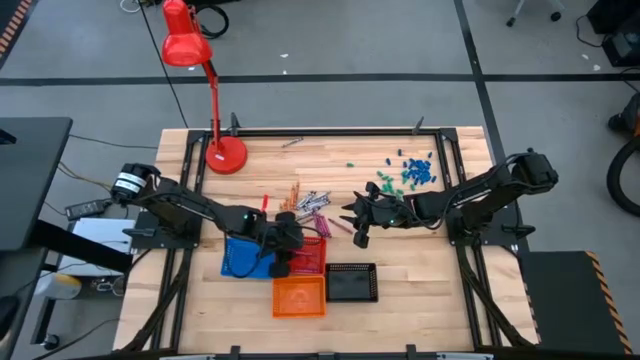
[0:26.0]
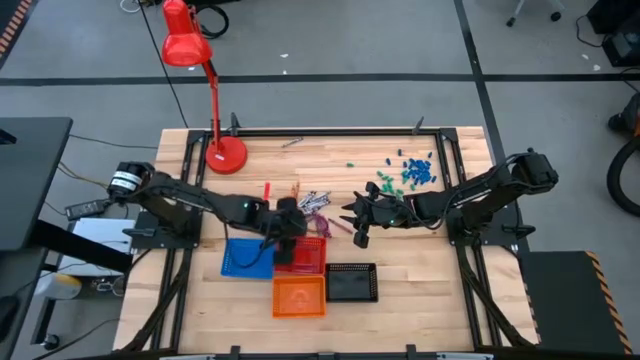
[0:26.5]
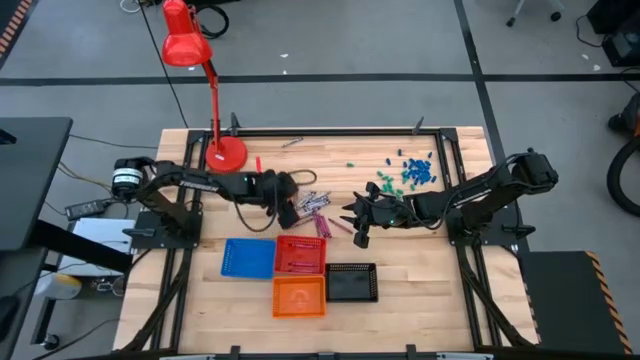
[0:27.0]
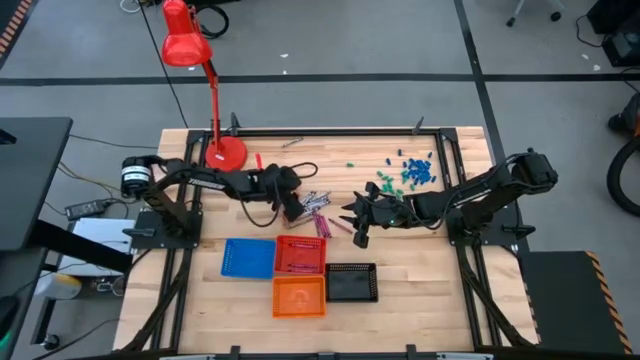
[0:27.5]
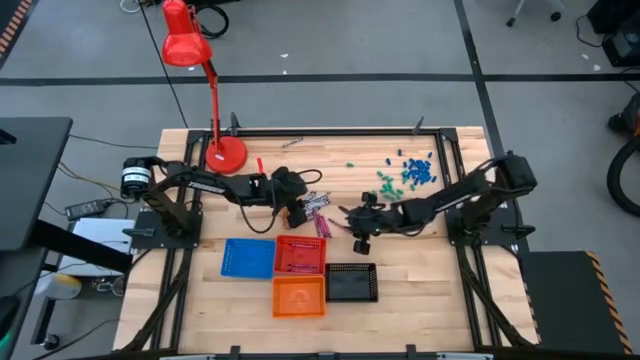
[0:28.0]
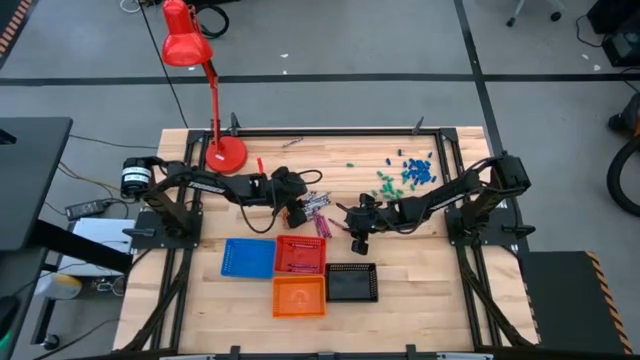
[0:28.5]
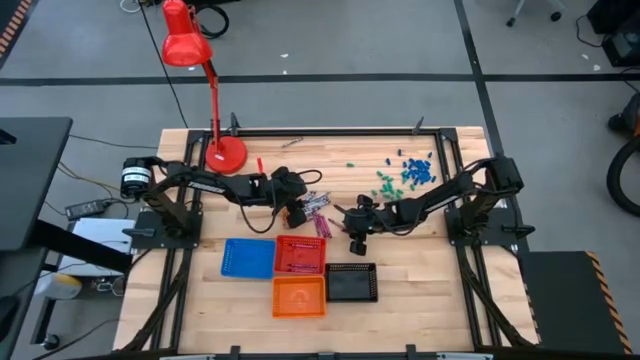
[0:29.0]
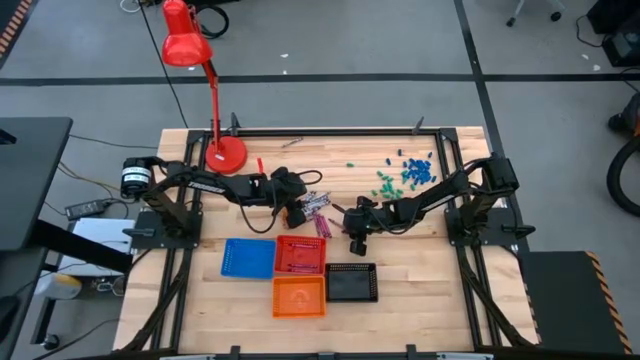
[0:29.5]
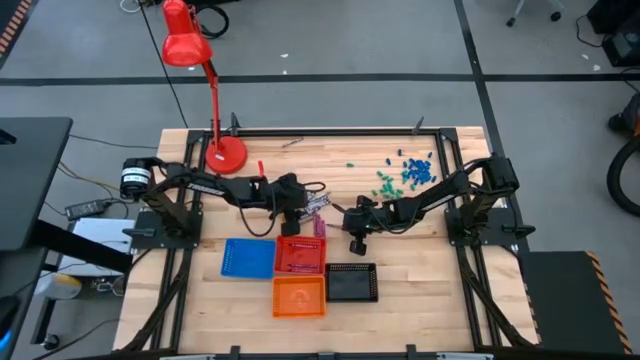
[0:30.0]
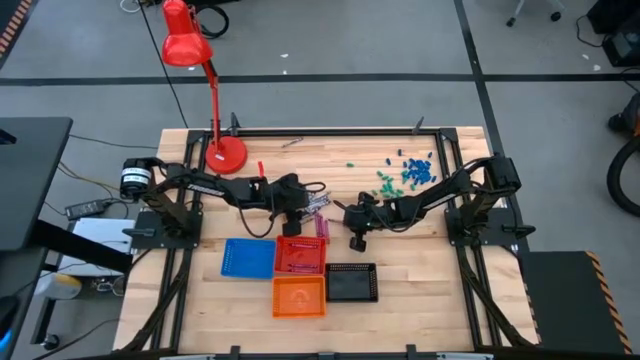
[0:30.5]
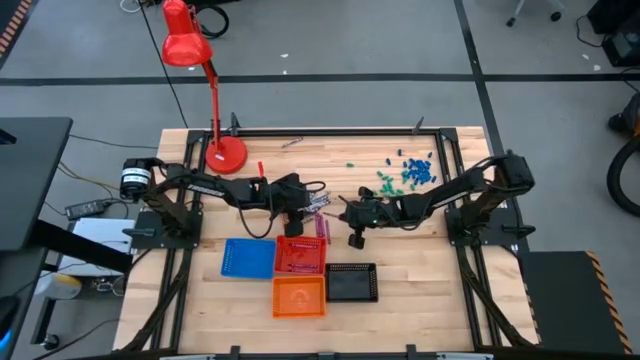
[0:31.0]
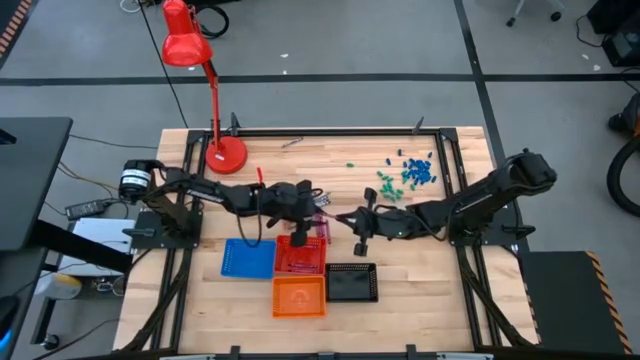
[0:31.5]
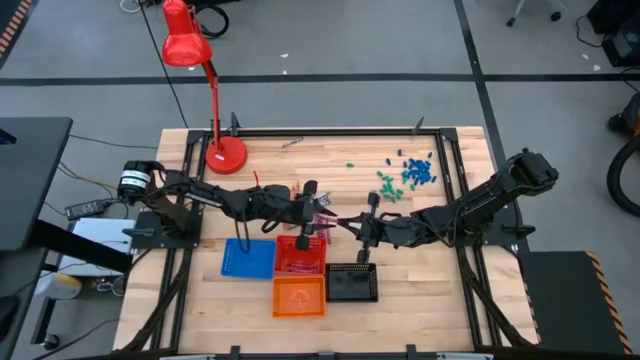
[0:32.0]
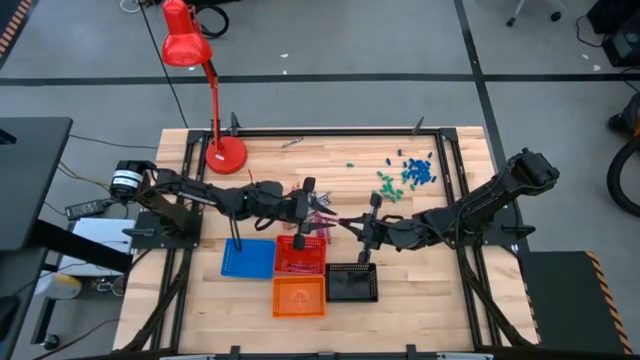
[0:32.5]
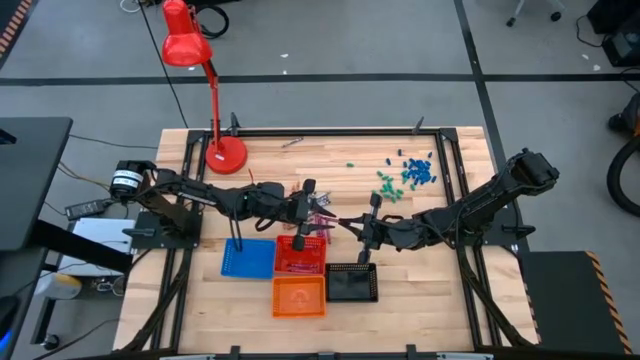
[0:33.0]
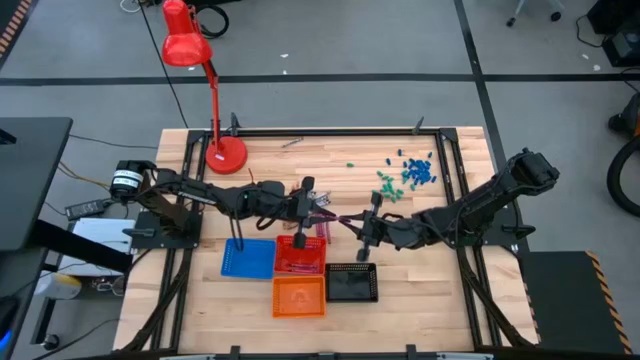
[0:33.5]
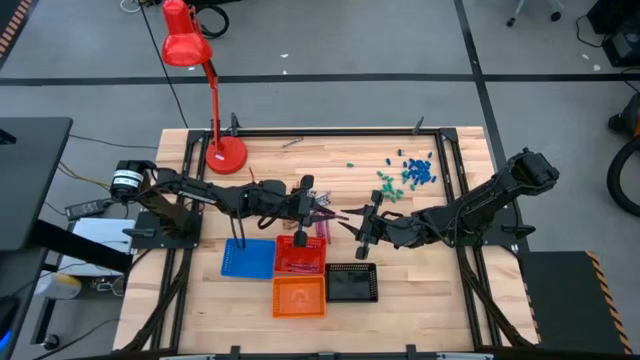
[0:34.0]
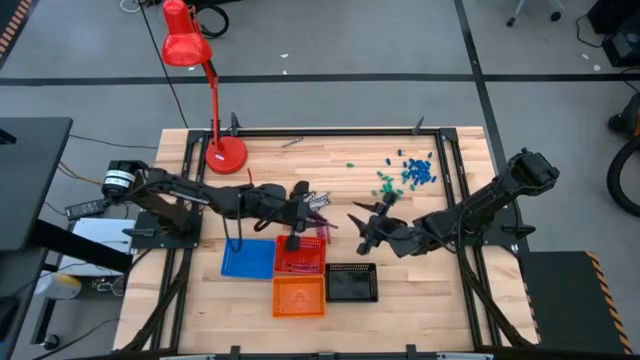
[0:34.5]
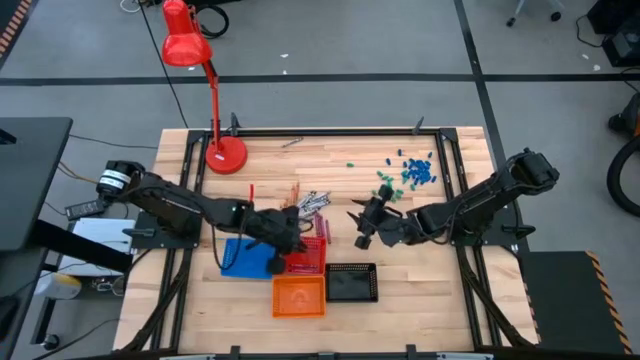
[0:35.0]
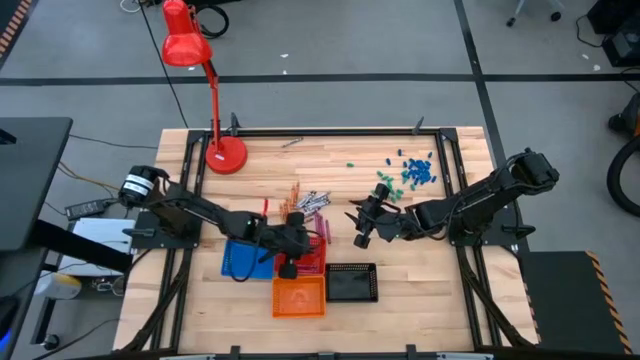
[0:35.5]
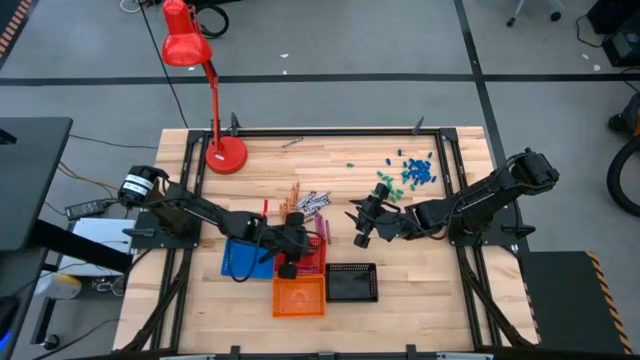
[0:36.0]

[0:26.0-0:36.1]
Task: Sort crayons
Put the violet crayon into the red bin

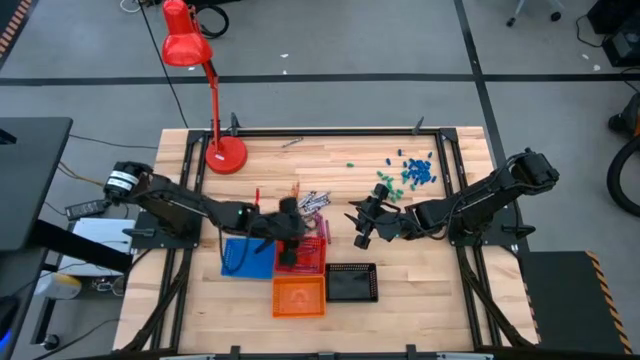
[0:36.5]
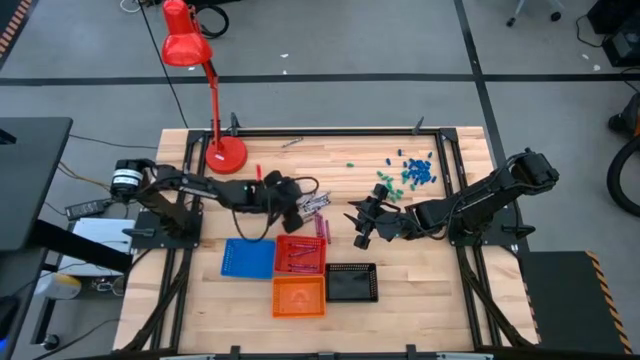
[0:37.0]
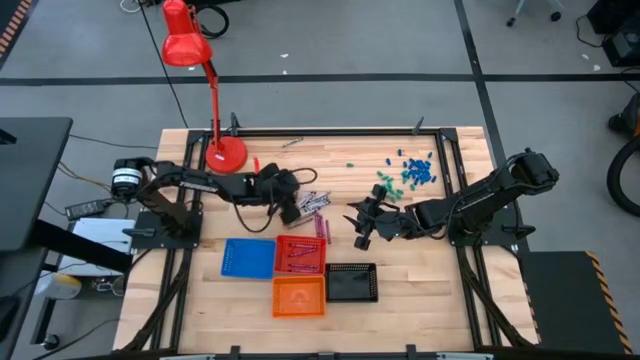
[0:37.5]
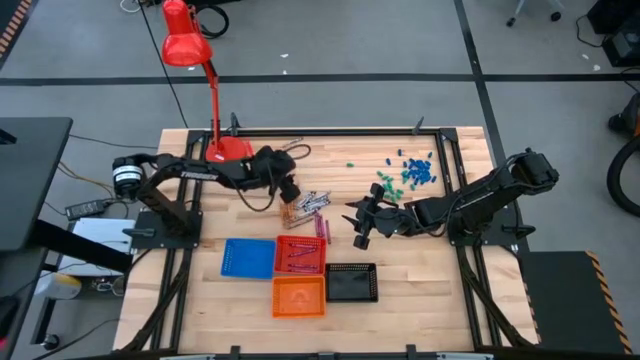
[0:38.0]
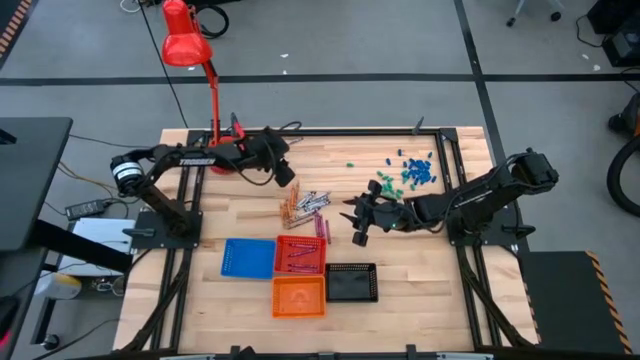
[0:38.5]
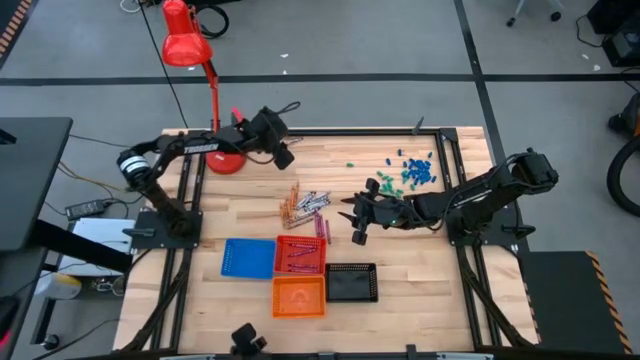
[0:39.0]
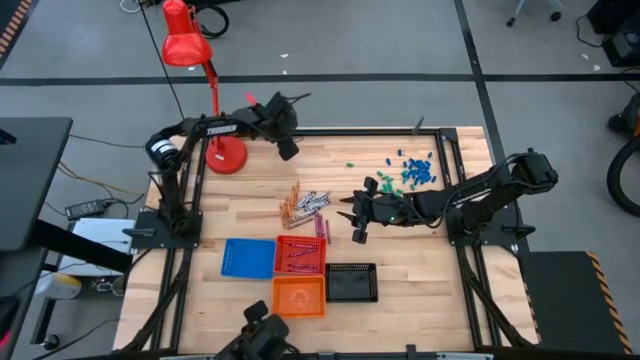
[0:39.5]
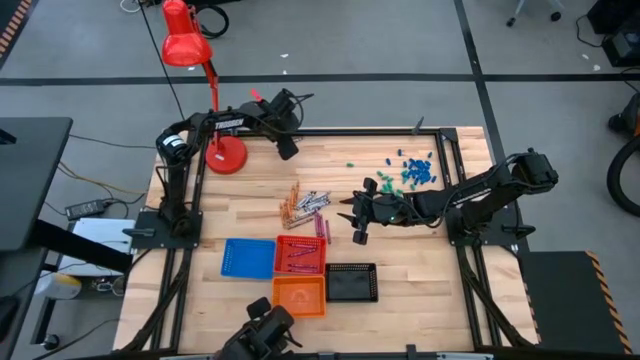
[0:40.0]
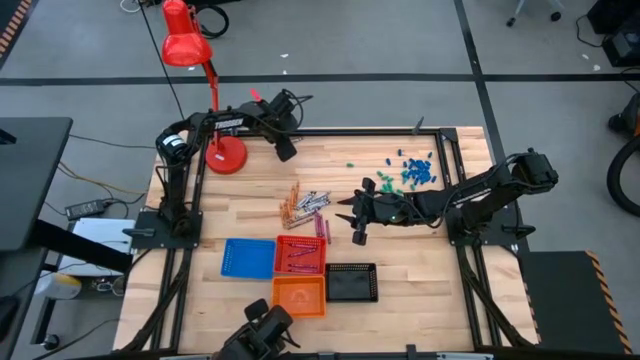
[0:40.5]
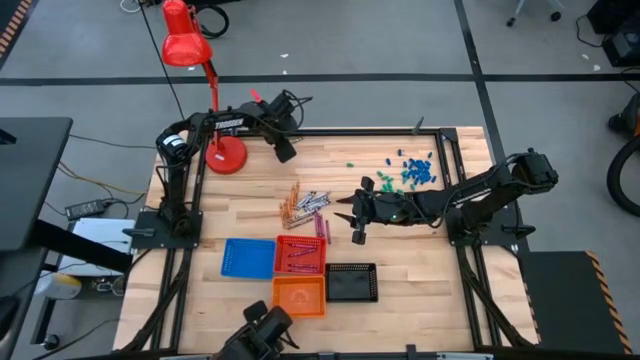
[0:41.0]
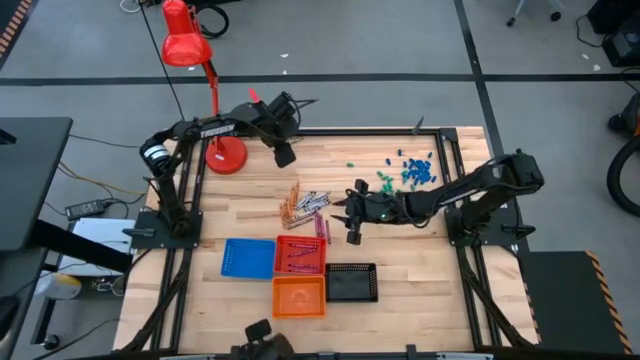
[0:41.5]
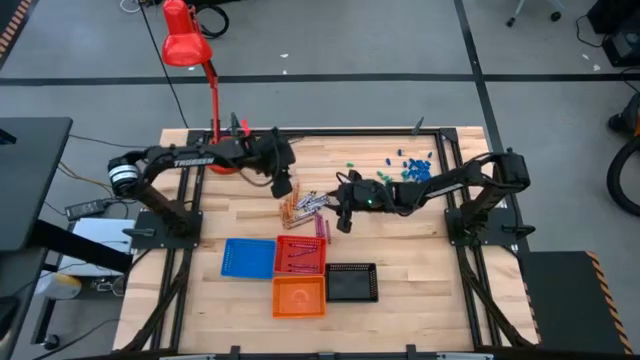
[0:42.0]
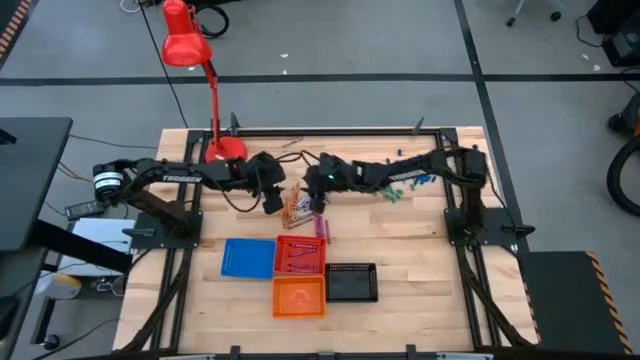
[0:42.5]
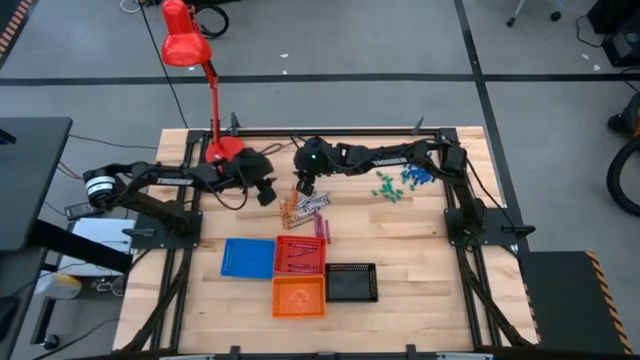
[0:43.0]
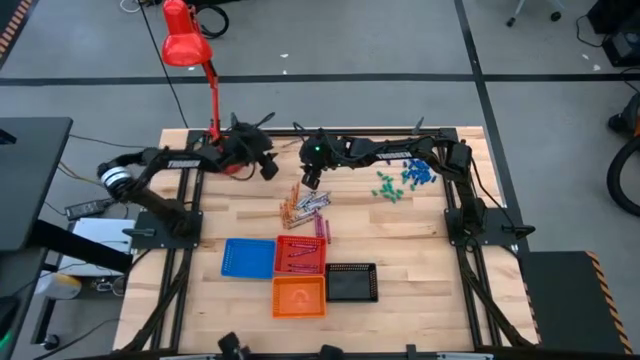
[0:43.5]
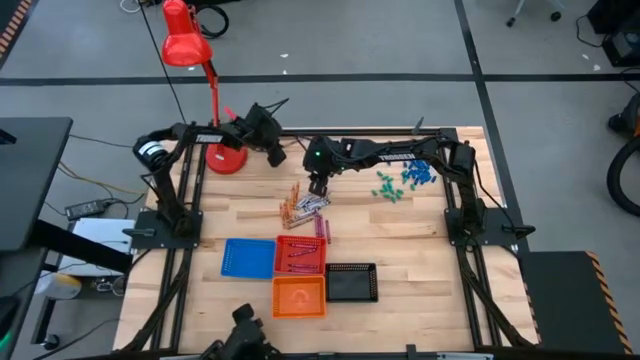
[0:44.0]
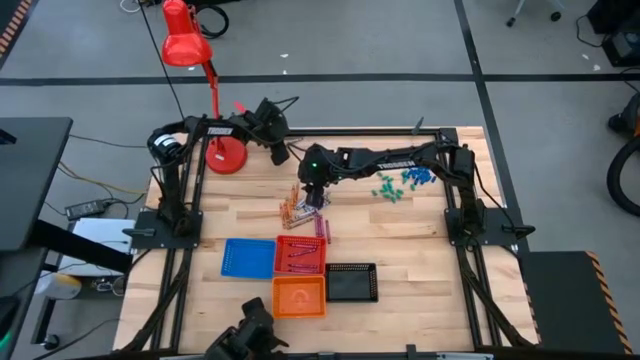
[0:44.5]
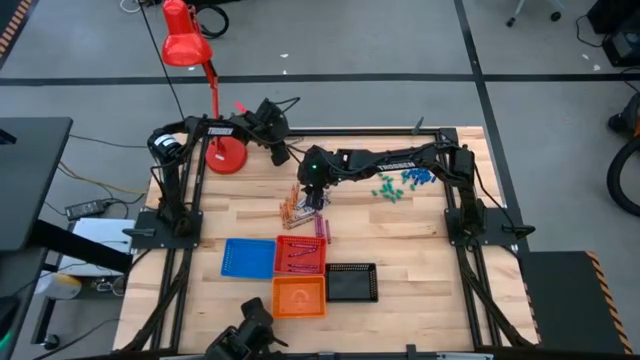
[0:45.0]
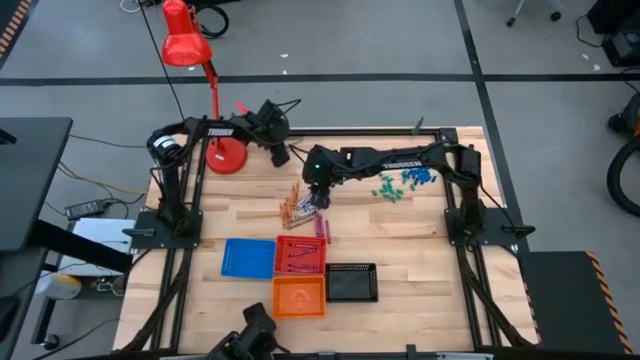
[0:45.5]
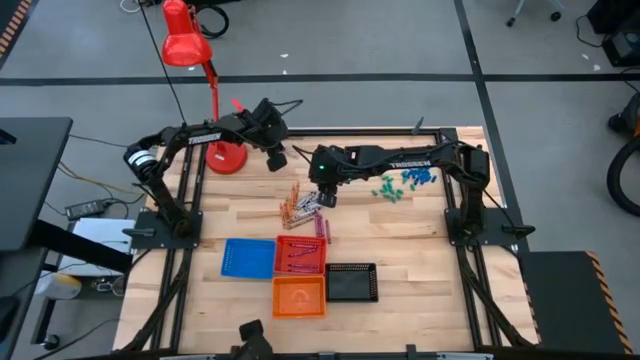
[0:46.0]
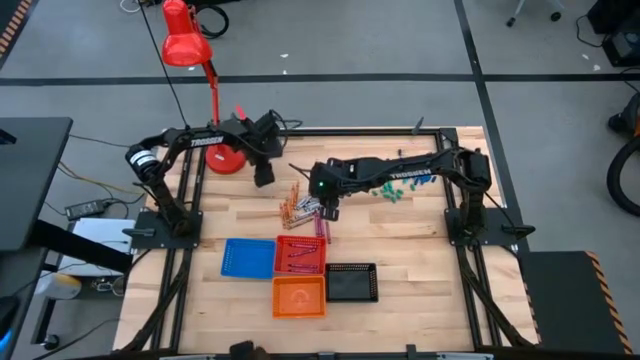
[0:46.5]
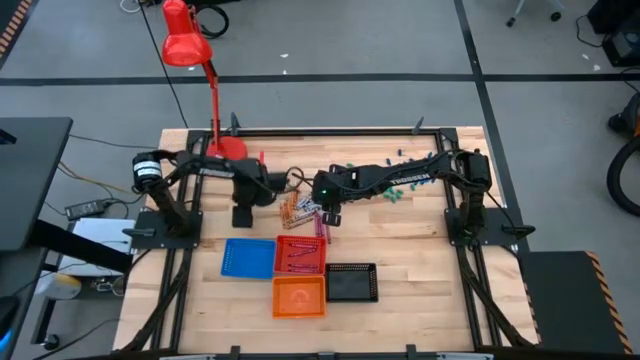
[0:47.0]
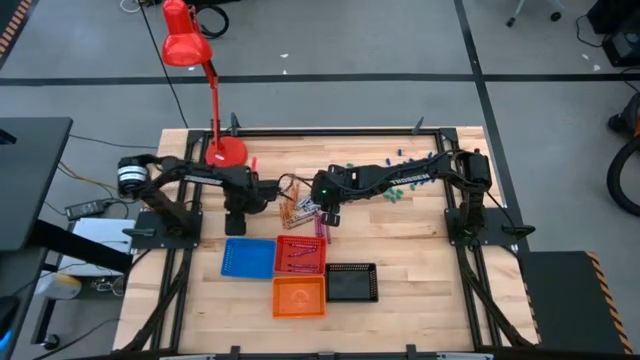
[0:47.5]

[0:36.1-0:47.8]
Put the black crayon into the blue bin
